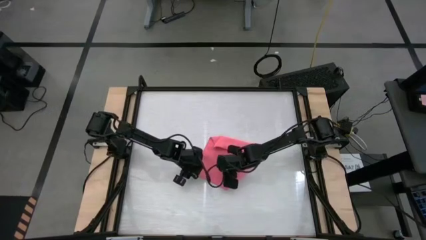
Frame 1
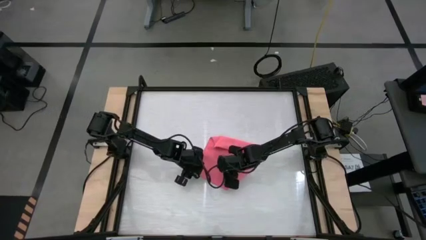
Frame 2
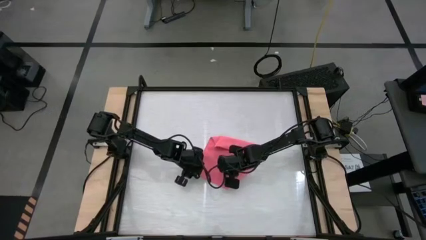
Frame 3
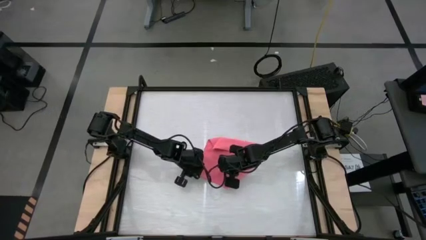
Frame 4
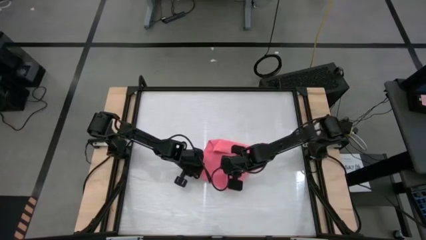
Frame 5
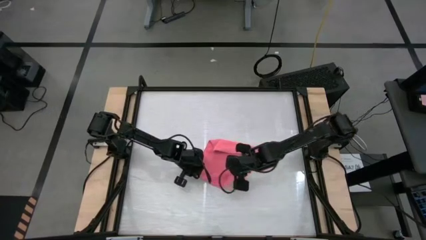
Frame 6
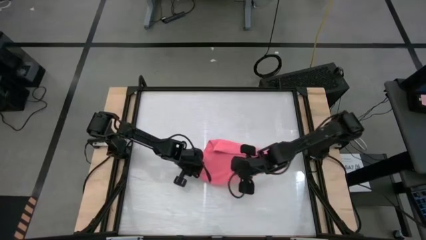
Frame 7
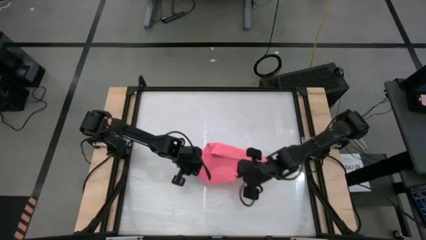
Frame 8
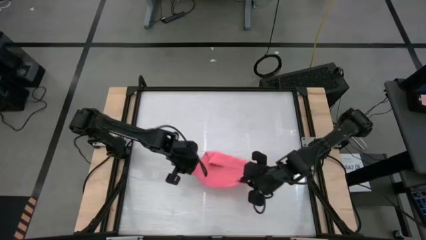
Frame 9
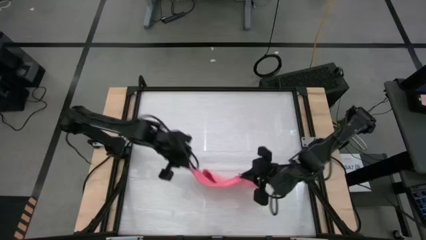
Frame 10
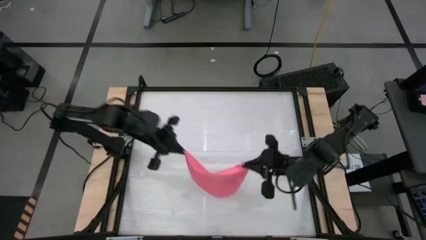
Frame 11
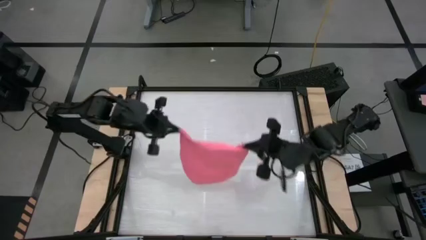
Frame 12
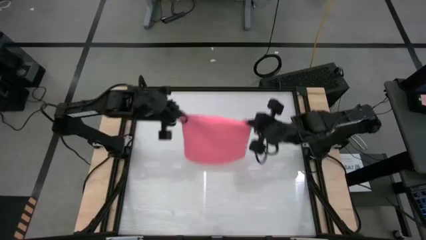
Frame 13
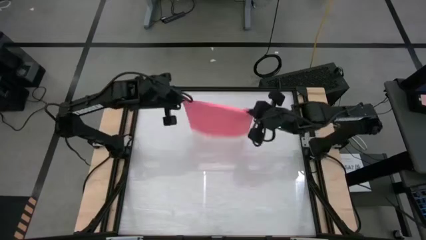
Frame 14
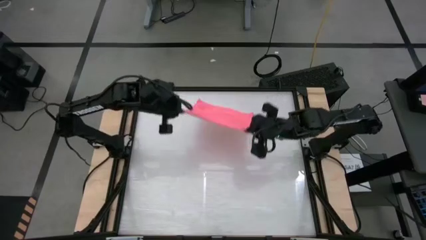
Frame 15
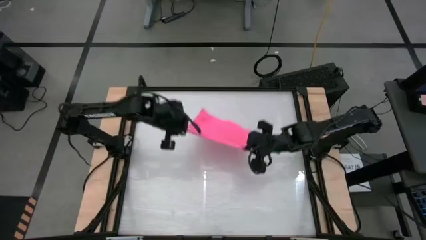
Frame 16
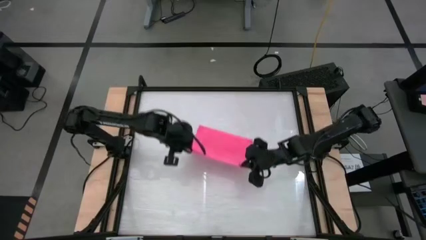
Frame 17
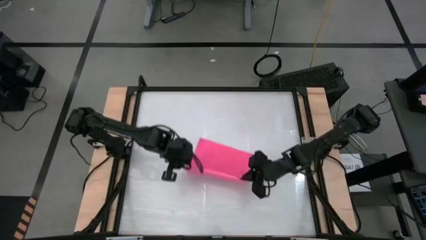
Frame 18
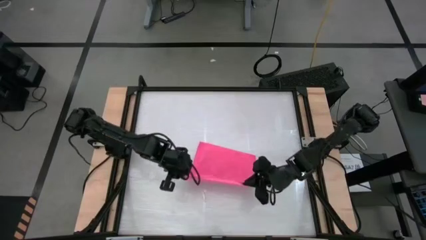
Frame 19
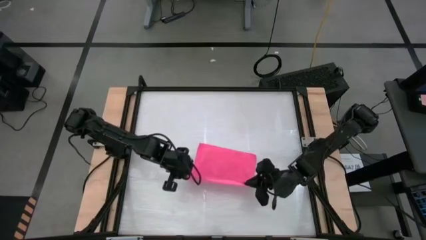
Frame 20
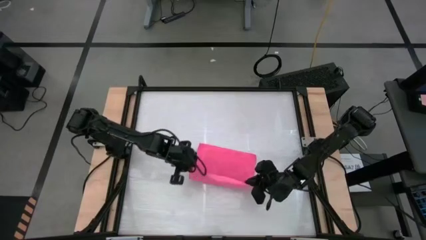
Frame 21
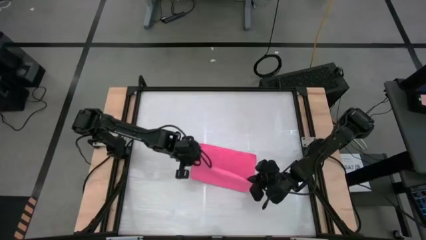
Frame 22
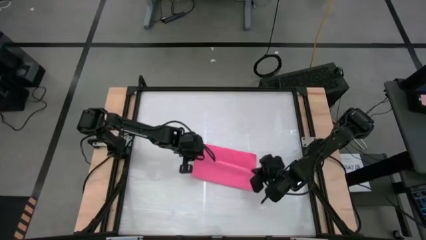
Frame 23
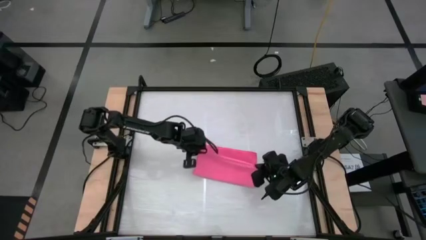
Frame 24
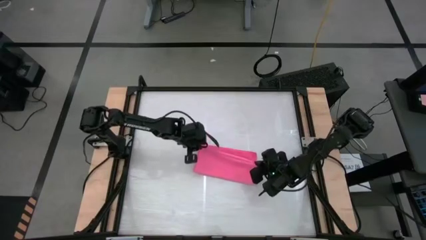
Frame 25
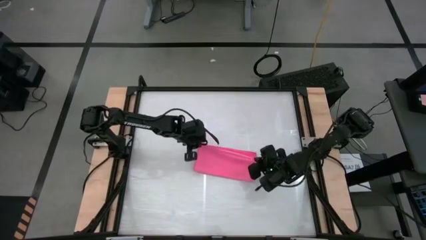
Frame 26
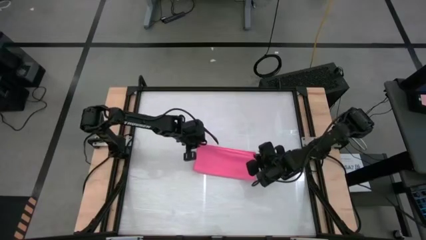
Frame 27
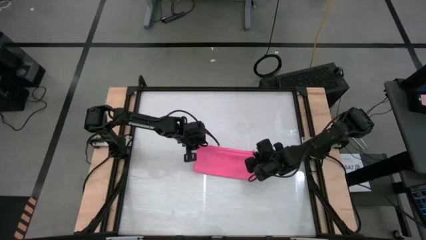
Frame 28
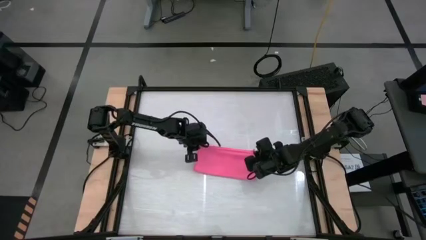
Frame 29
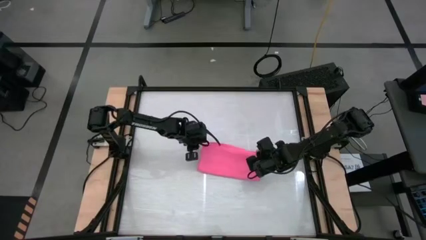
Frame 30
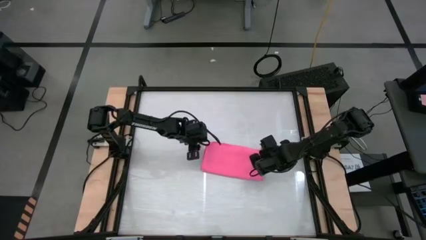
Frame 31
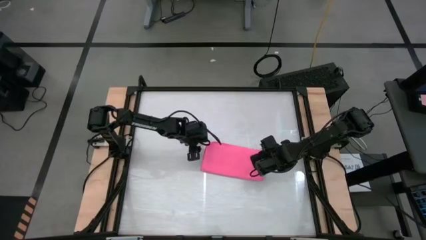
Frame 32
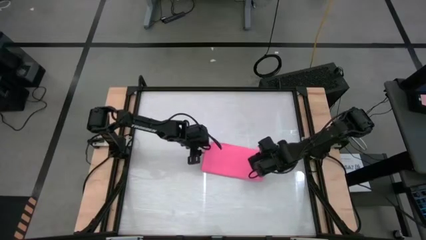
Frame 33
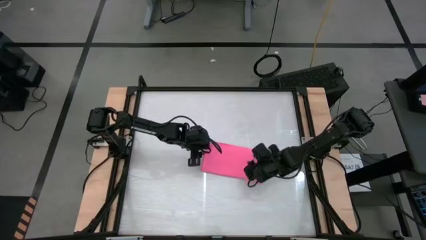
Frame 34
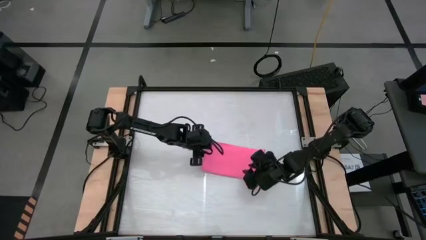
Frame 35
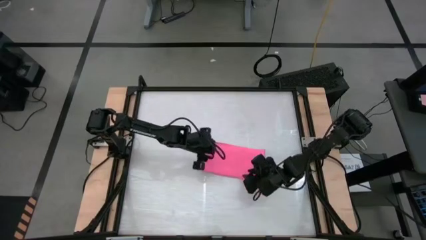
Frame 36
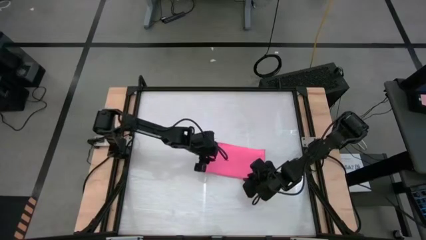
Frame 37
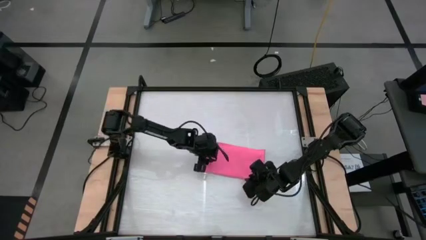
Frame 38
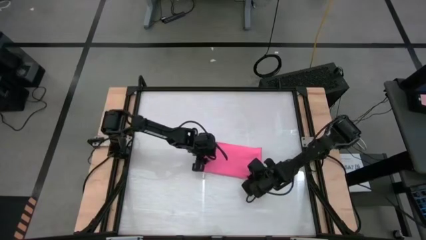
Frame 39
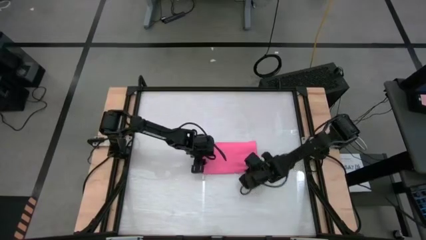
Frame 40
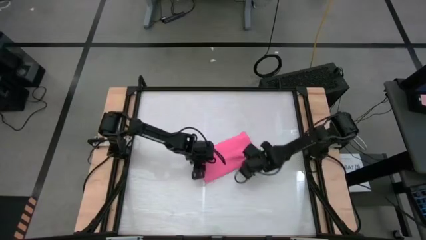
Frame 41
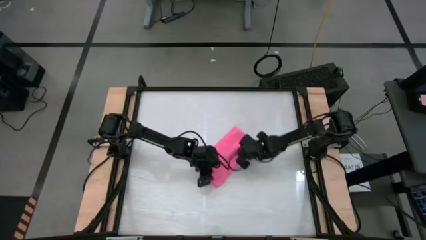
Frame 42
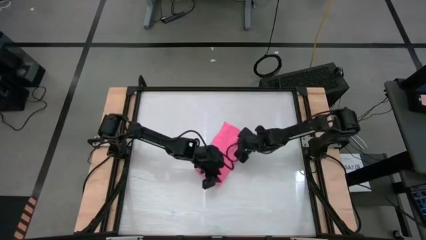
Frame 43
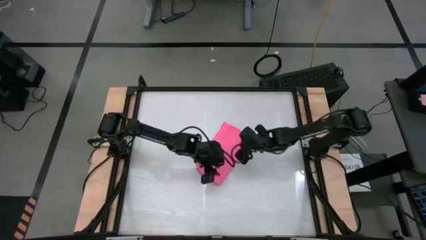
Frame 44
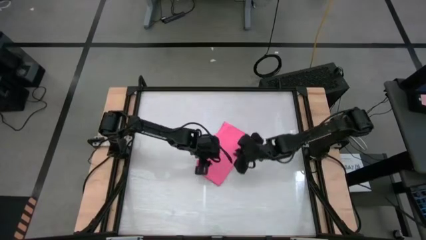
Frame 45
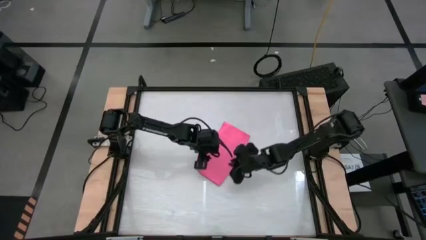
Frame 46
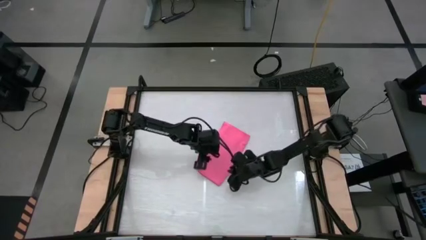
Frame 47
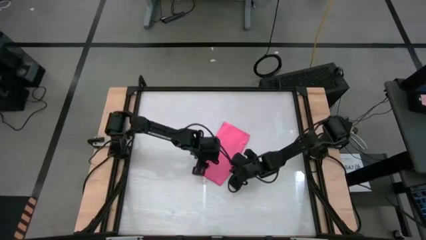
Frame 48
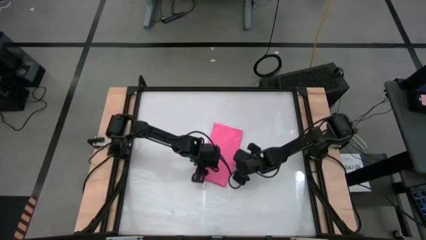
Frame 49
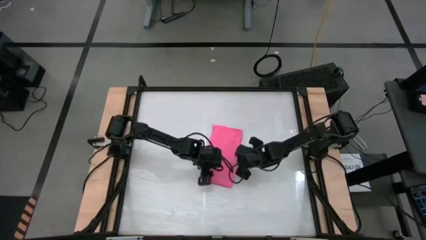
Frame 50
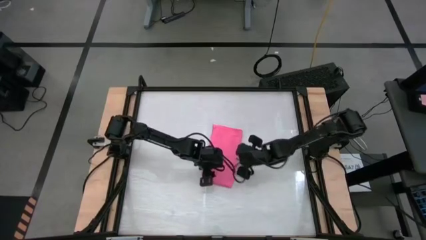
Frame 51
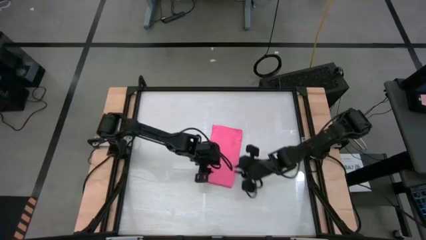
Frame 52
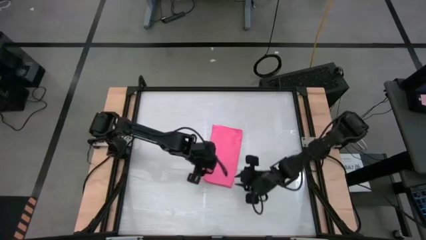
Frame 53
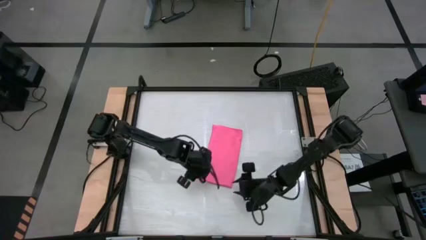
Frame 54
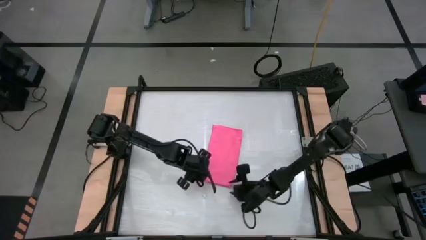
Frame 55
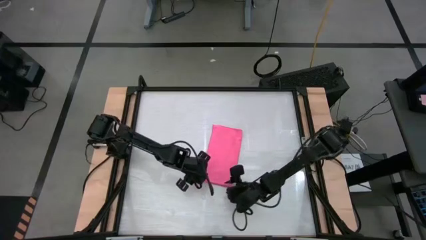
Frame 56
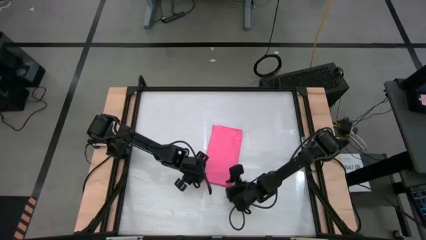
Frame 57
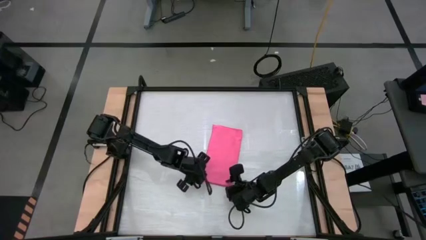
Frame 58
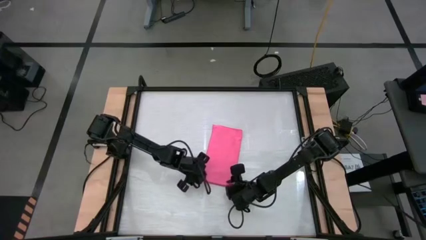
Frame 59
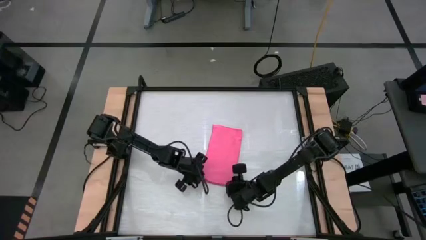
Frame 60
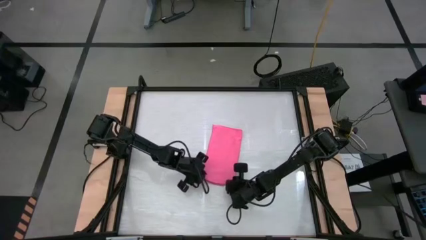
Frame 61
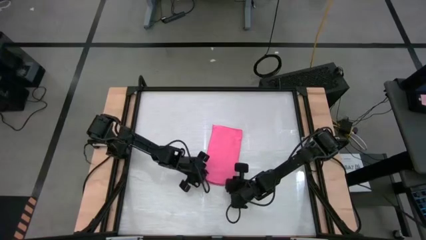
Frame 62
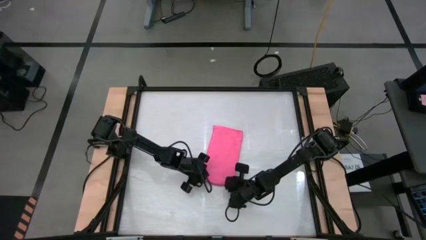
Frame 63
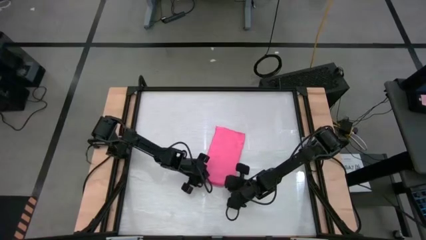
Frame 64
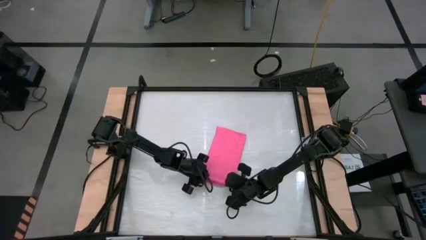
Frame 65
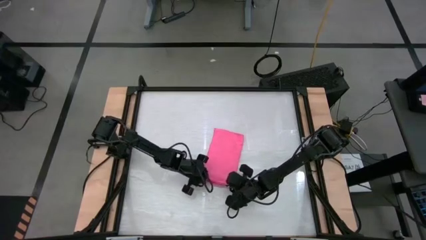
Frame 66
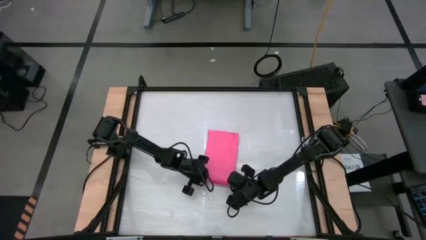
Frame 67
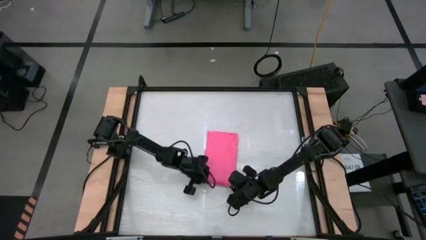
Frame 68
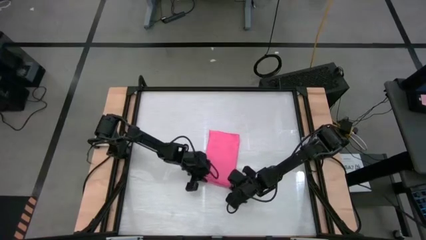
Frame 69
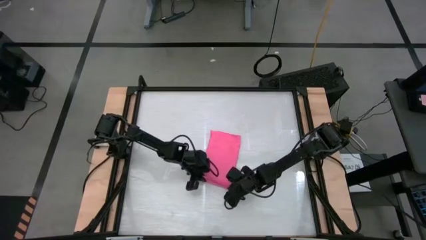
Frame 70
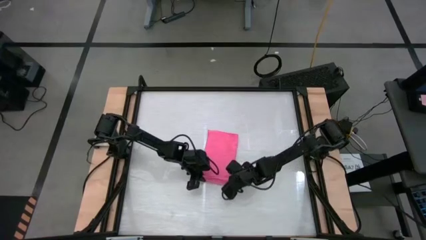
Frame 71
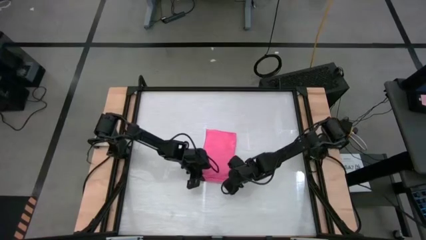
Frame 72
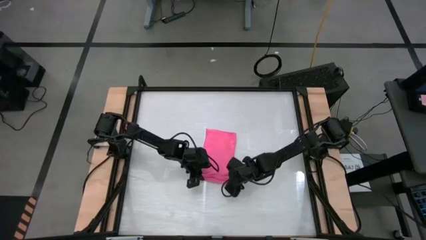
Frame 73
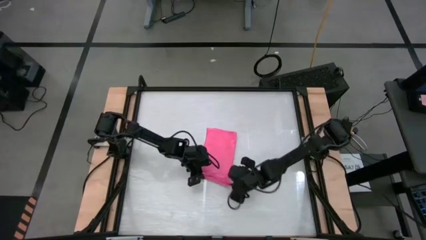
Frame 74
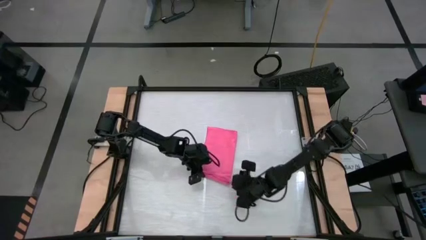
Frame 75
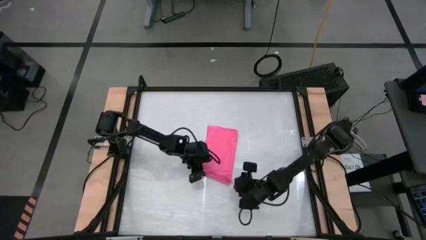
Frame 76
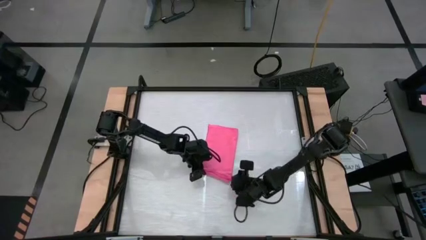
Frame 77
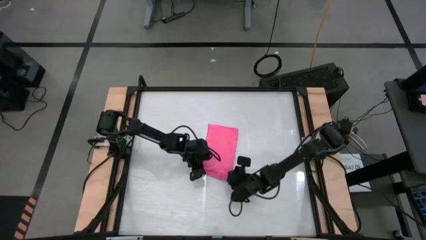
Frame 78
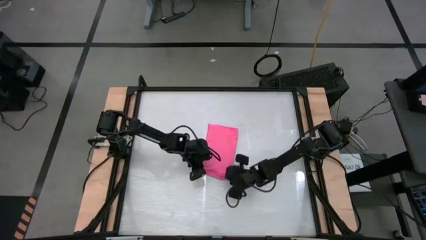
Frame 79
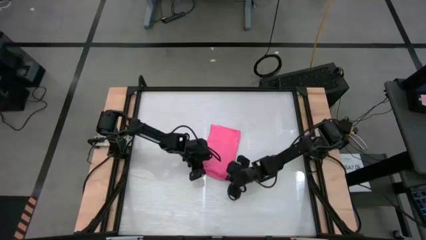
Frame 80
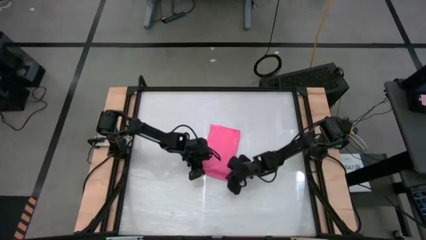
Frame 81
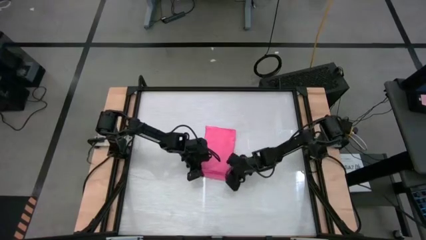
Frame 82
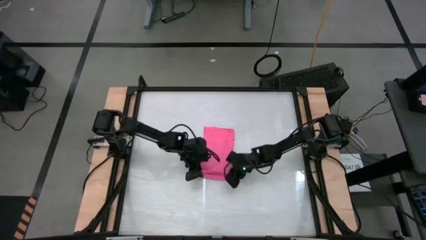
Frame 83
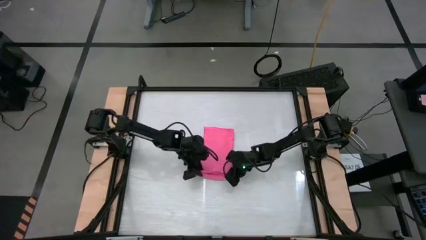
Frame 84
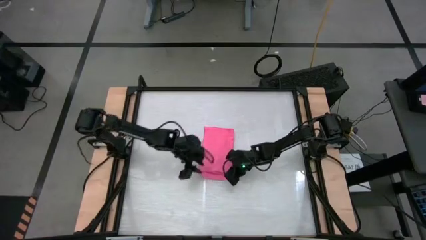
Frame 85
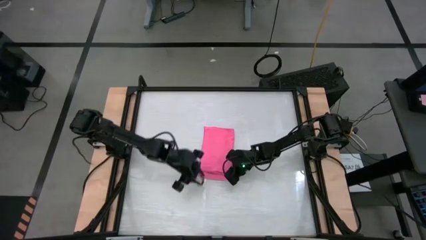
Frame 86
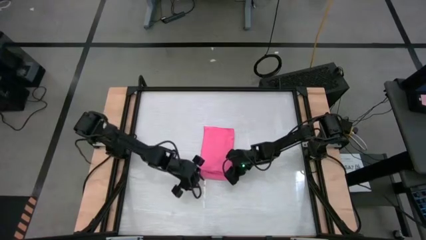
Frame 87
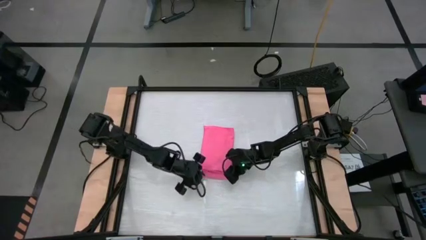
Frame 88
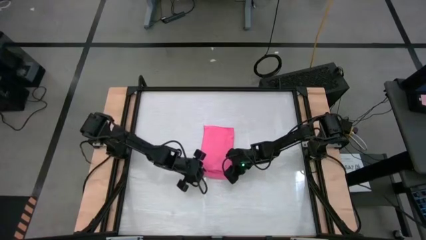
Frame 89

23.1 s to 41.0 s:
Task: Roll towel
Roll the pink microfiber cloth
